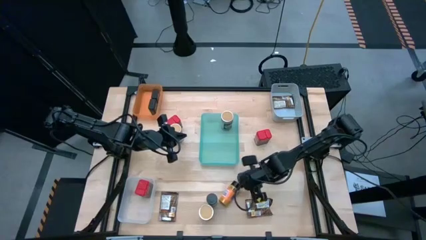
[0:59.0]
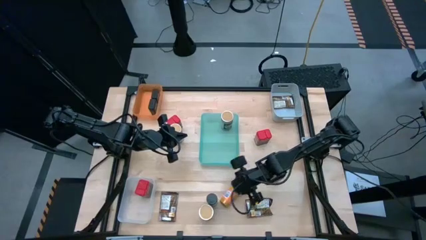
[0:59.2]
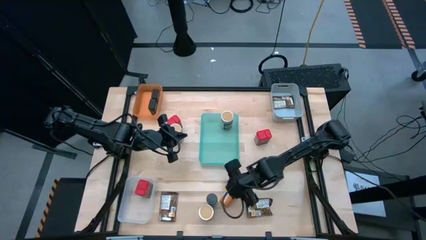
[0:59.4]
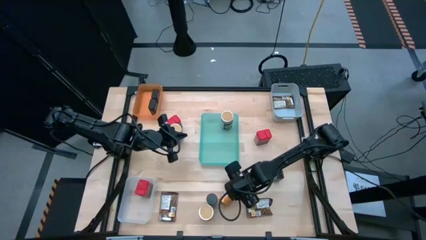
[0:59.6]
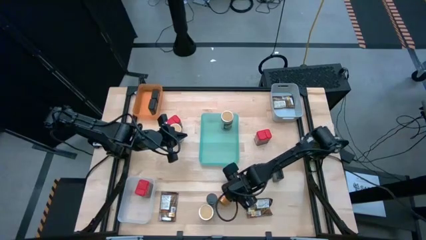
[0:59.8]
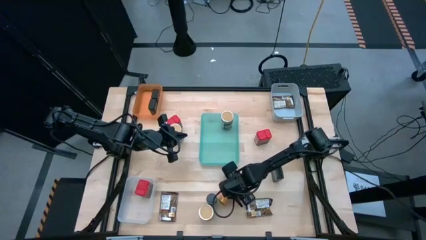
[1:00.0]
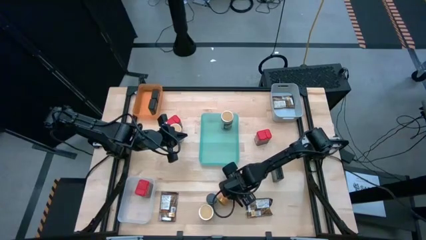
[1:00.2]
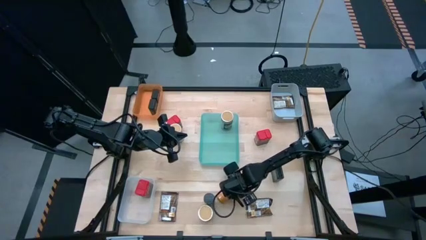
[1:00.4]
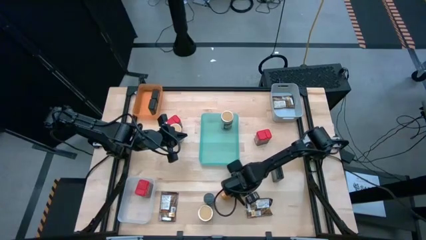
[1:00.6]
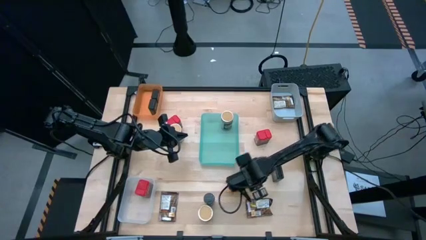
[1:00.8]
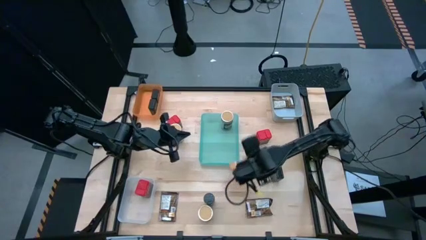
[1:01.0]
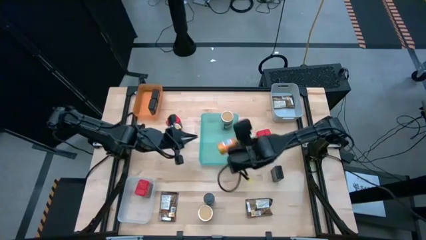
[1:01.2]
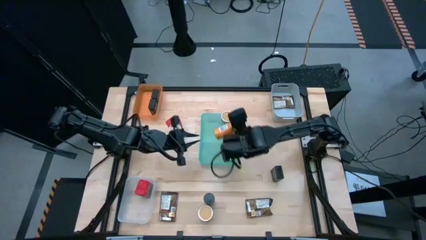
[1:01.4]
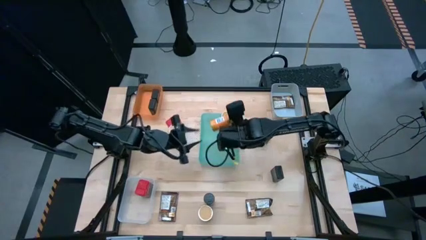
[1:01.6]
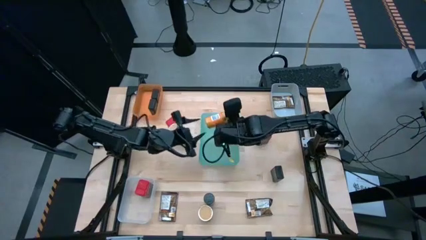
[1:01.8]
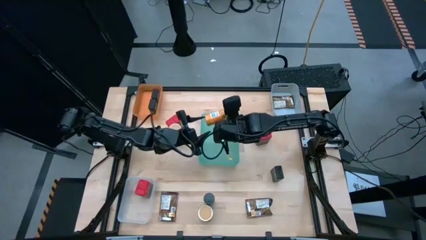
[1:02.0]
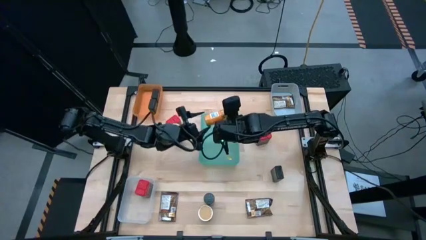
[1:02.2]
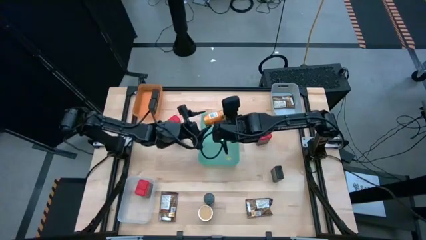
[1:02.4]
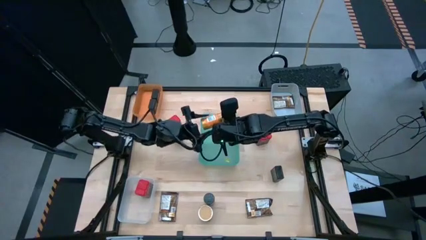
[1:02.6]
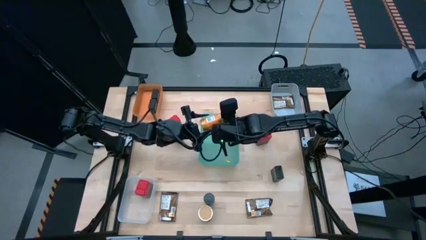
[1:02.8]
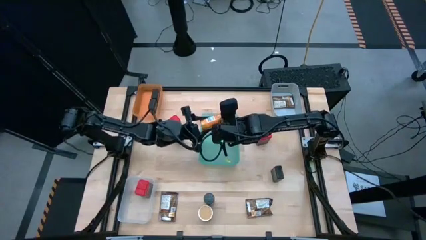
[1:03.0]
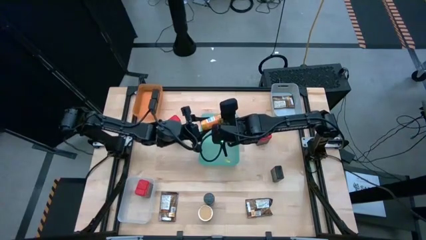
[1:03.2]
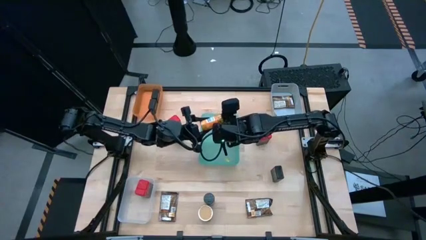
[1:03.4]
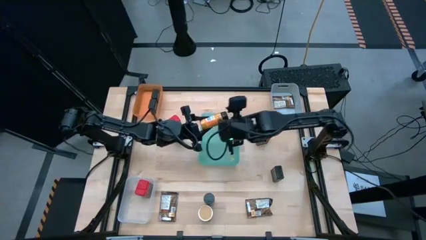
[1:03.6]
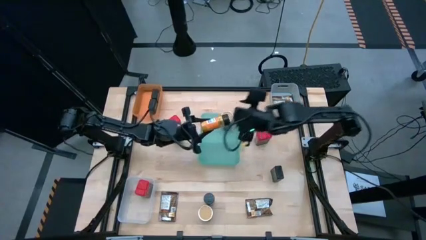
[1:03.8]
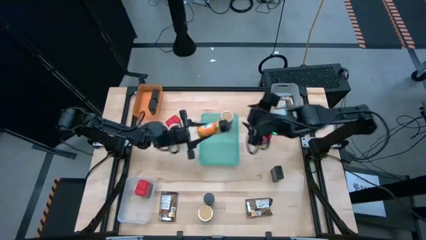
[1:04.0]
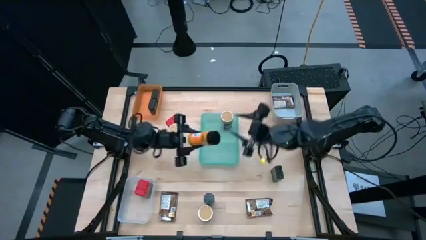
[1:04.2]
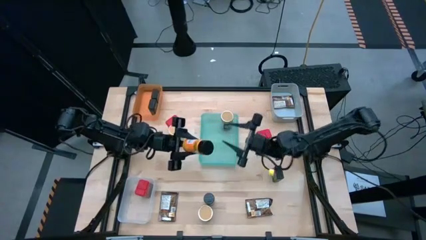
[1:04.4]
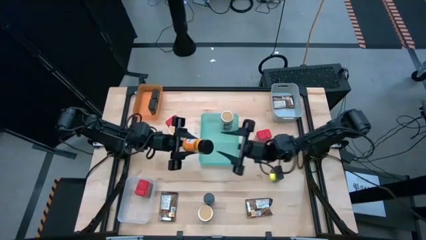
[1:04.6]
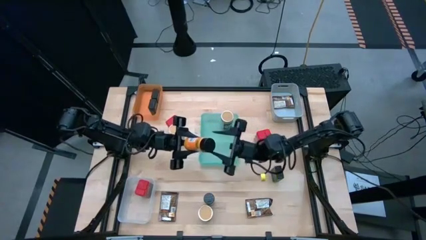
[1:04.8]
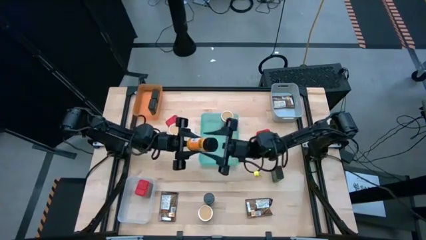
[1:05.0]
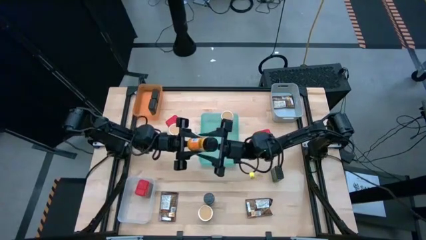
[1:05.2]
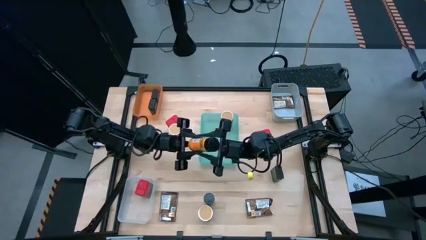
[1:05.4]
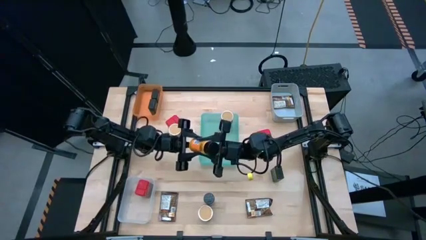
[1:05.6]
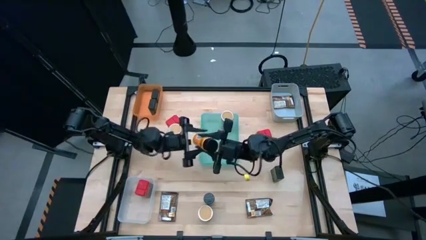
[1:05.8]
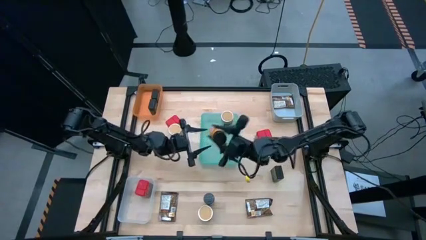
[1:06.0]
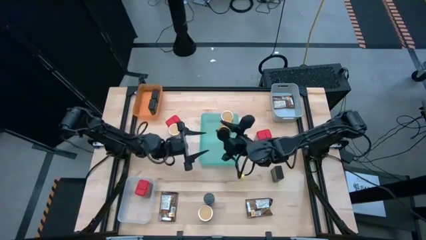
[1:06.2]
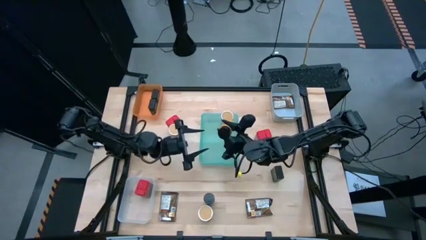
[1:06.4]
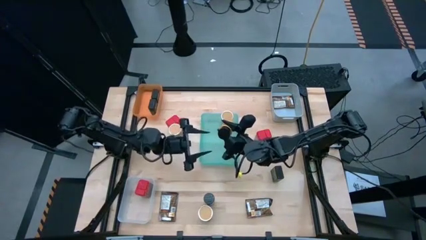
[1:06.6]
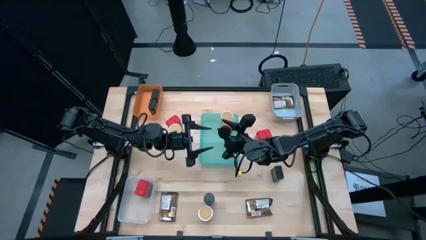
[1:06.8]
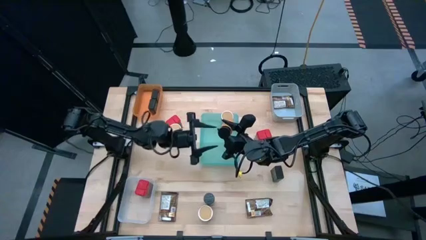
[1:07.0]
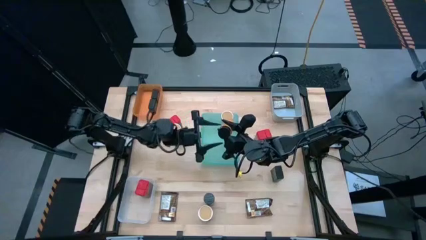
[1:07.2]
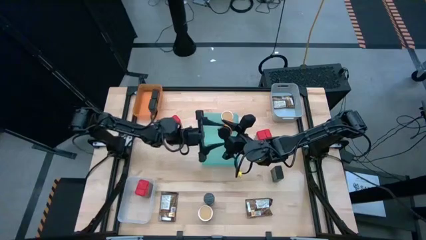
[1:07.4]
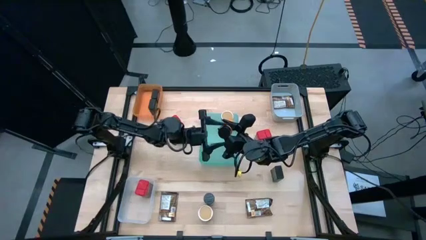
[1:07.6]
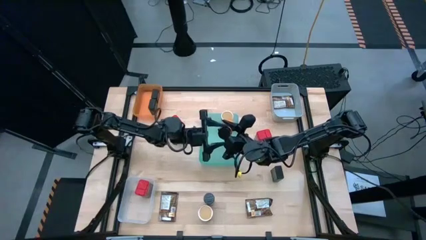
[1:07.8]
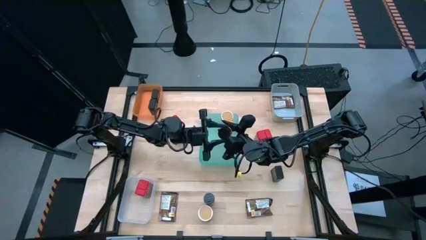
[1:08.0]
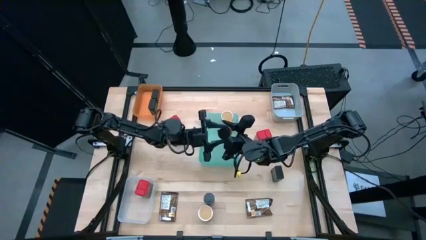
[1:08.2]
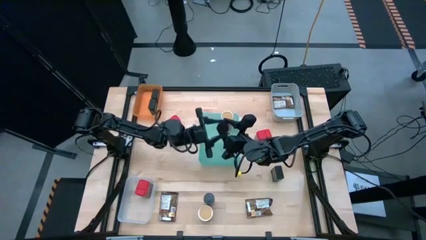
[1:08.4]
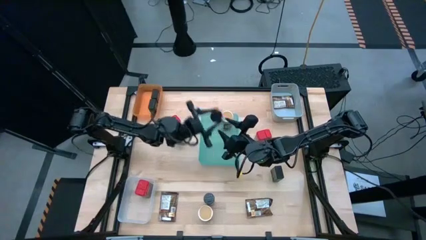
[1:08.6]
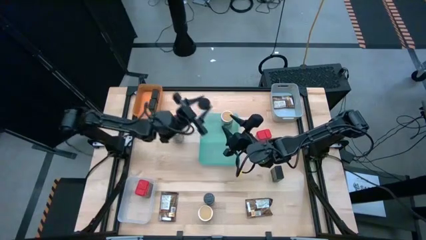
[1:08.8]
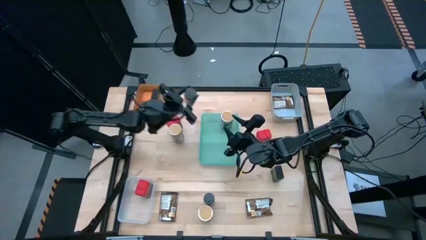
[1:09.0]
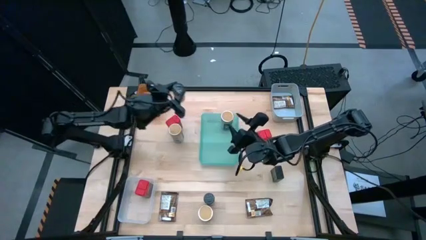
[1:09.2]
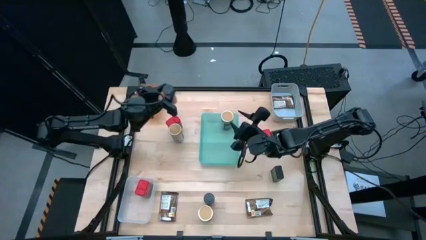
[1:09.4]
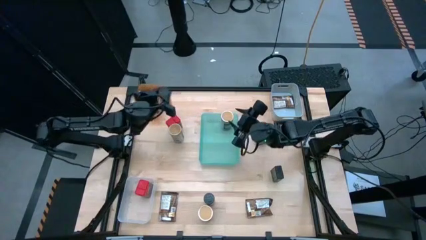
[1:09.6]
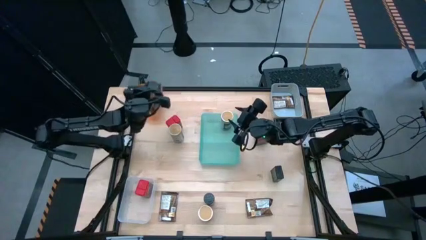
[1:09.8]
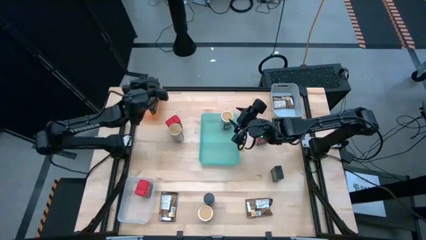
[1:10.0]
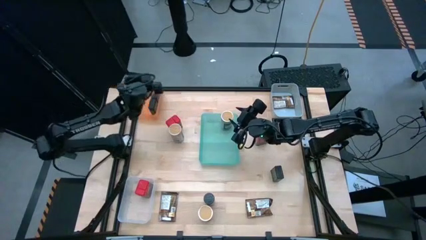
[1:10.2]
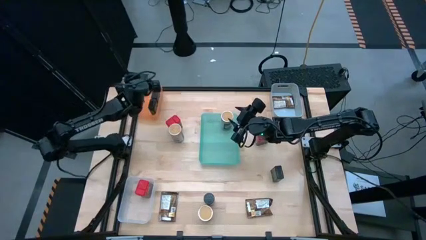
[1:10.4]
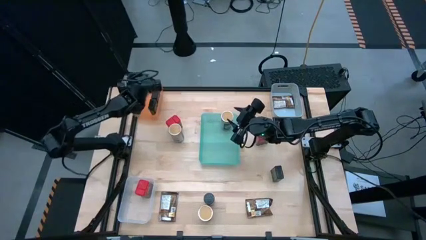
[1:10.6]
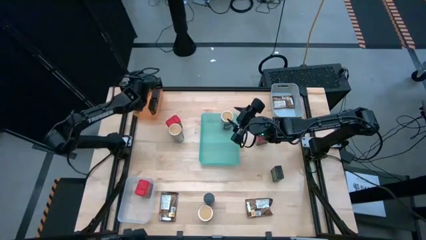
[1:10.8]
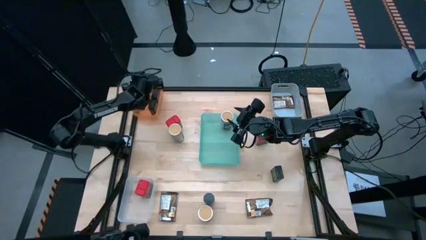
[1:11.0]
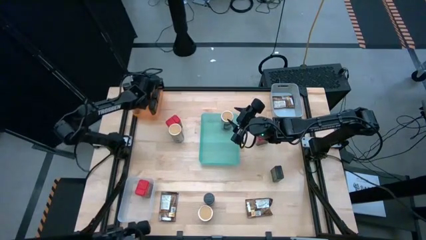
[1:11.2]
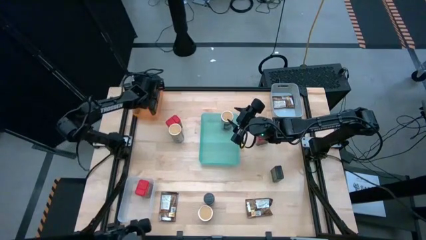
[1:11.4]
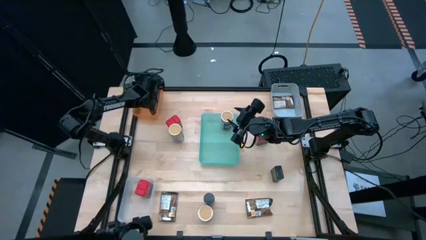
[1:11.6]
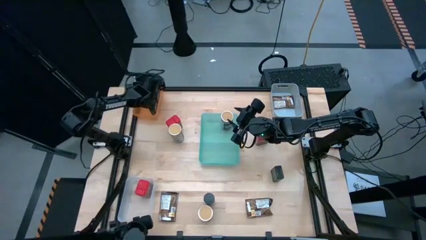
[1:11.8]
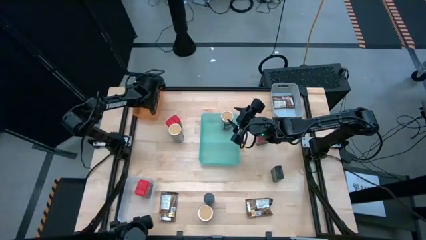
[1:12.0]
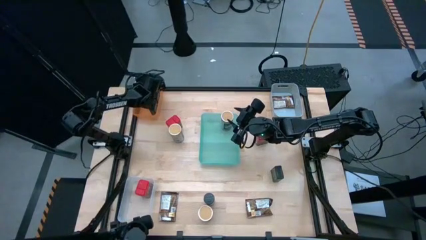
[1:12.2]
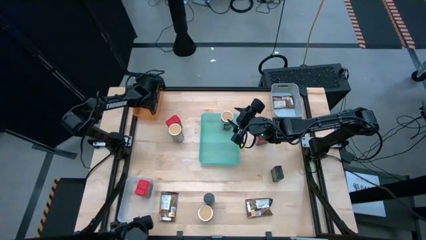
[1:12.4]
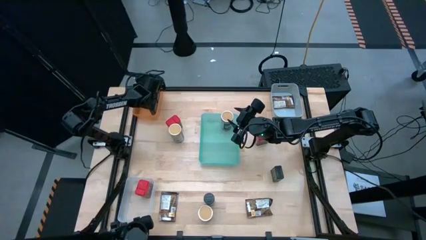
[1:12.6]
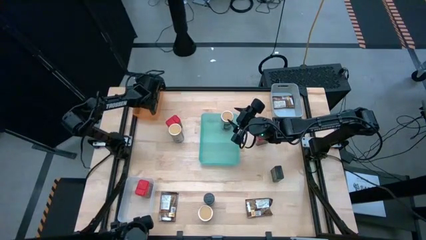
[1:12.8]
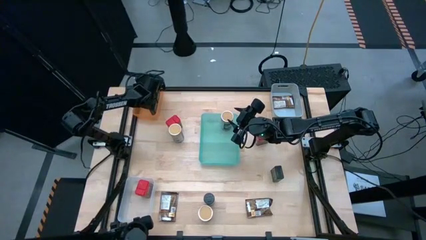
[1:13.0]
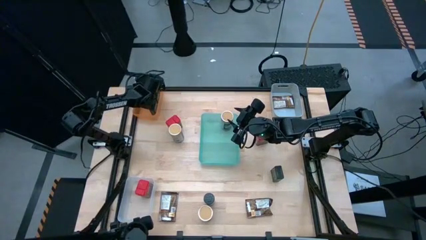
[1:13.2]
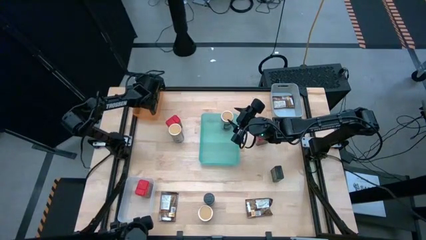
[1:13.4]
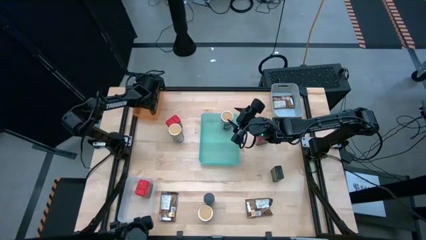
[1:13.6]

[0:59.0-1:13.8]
Task: Sort spices by type
Put the right black seasoning bottle into the orange bin
